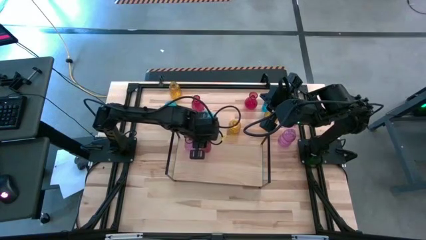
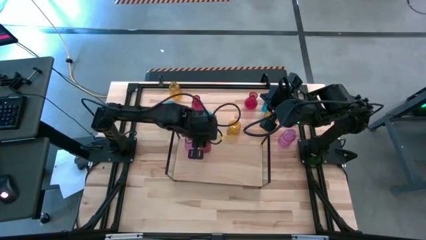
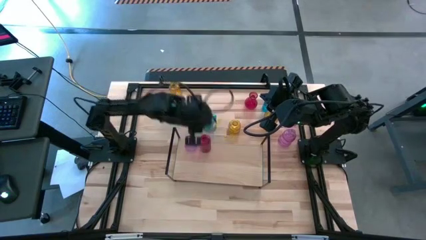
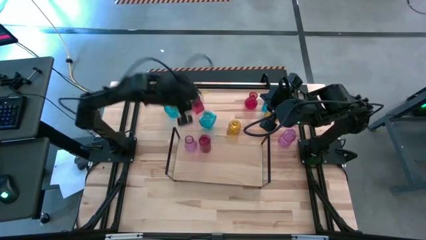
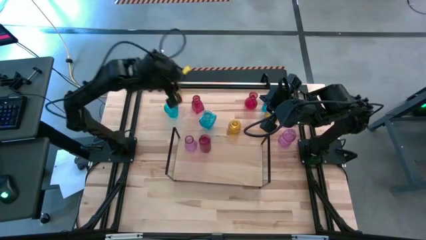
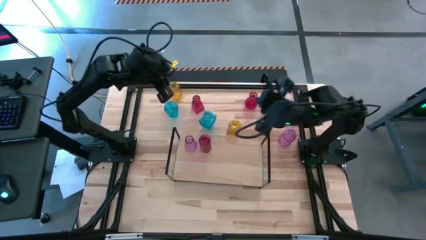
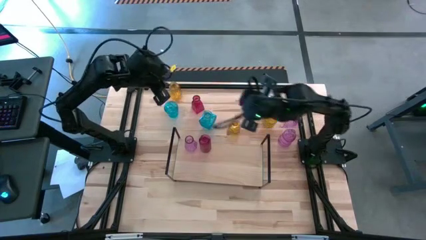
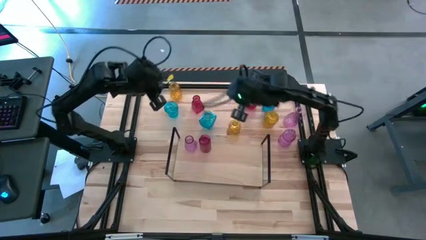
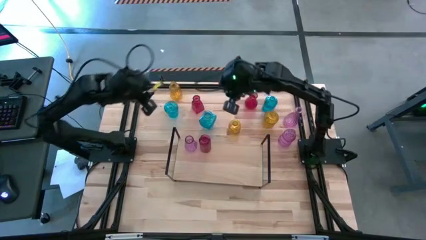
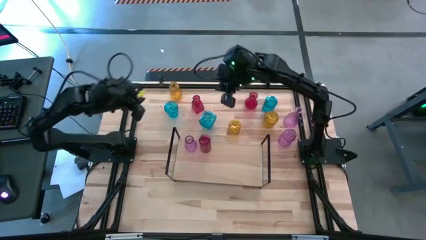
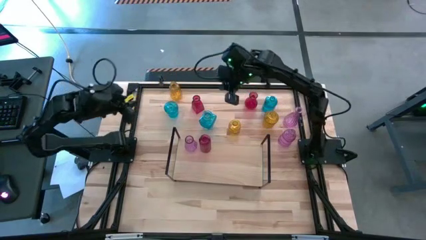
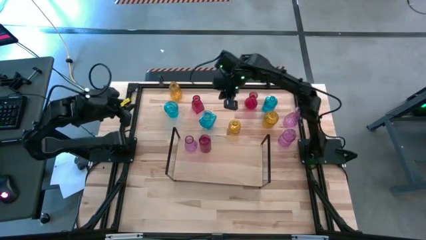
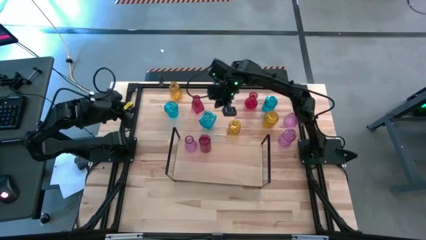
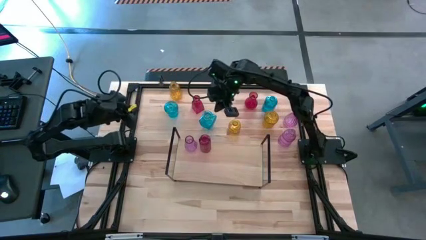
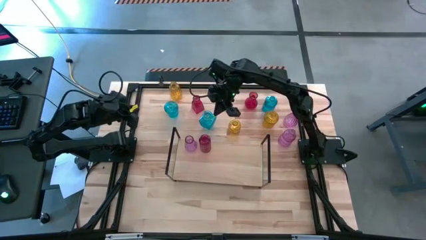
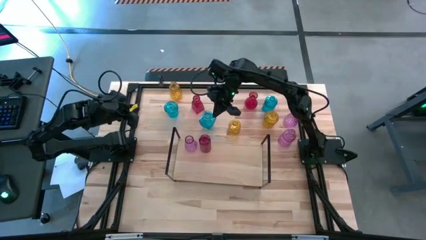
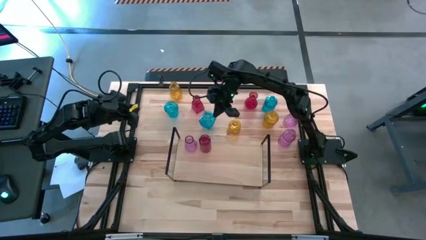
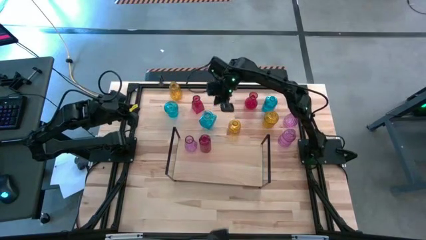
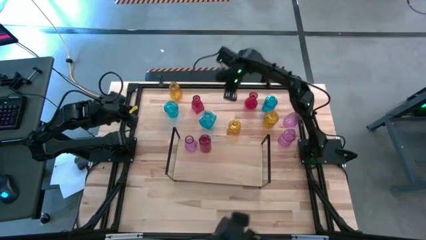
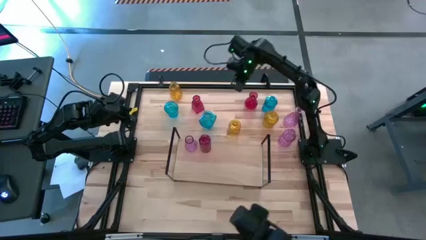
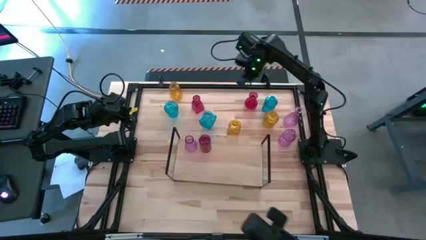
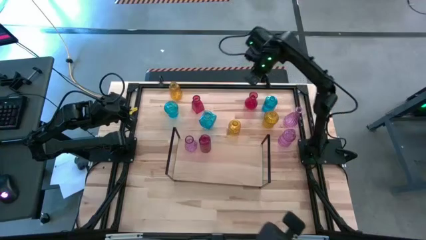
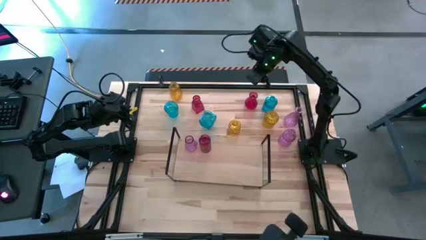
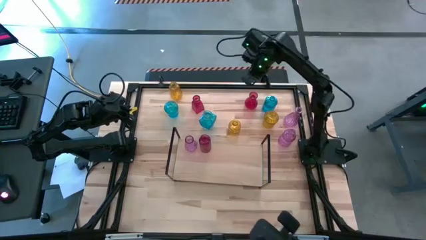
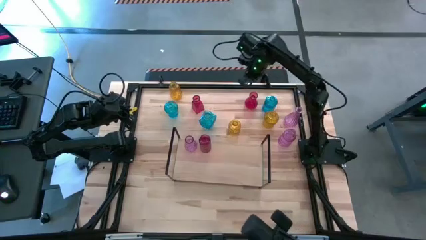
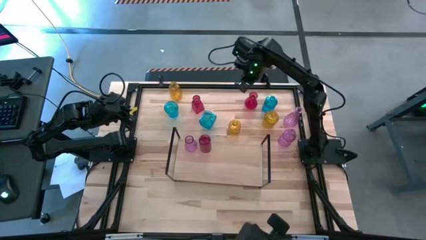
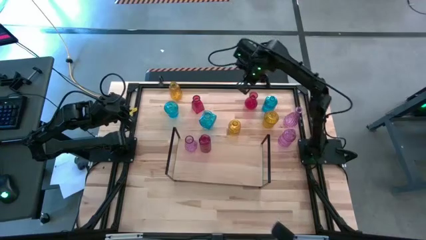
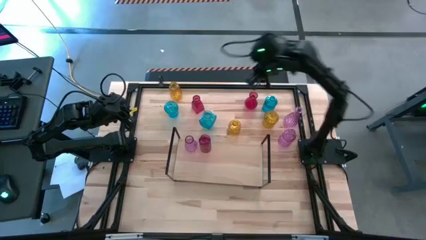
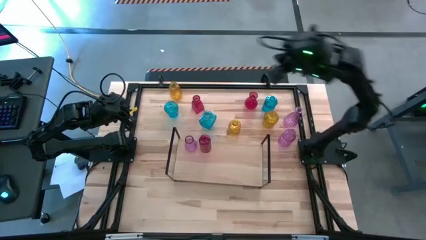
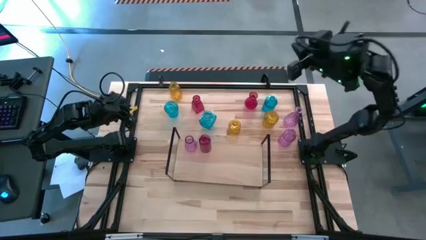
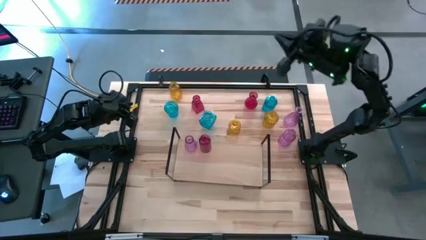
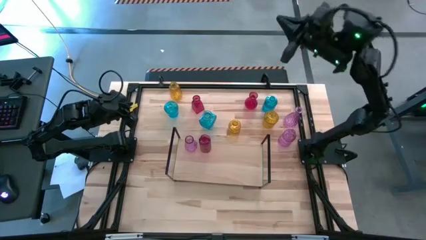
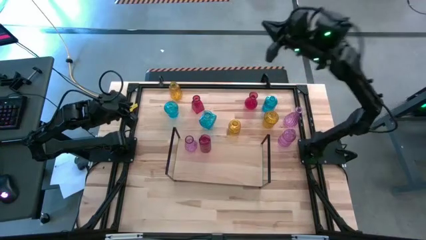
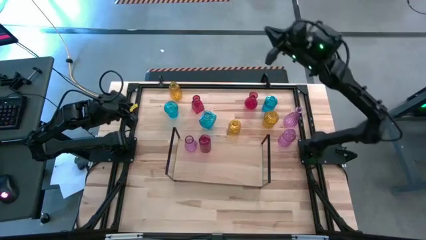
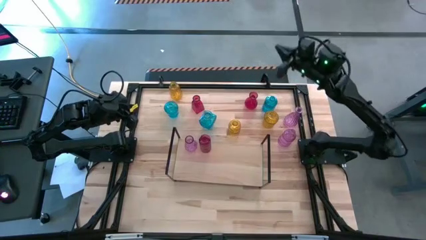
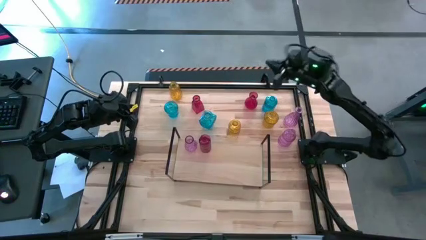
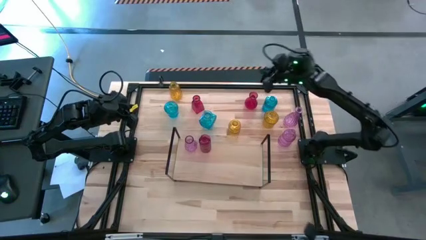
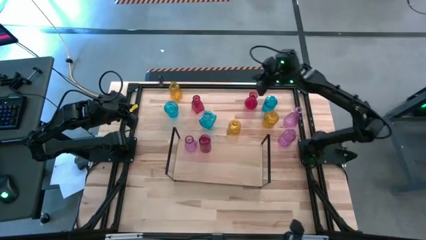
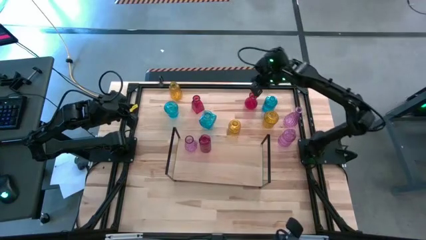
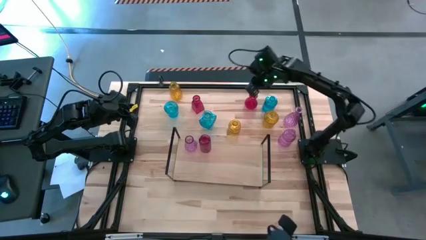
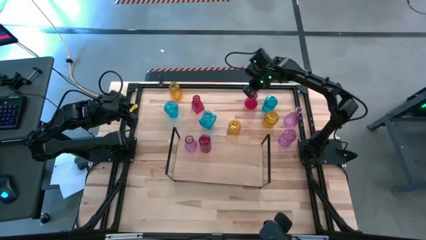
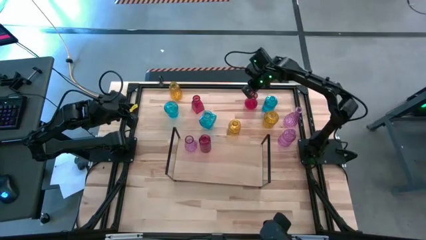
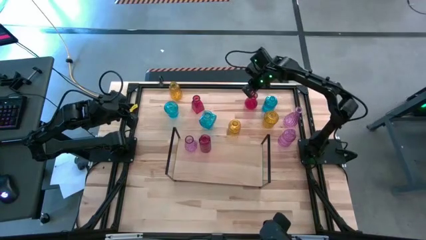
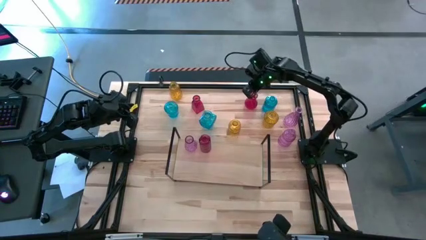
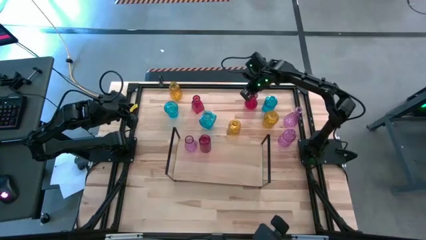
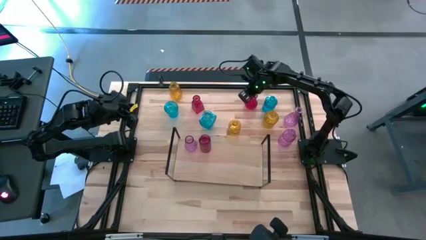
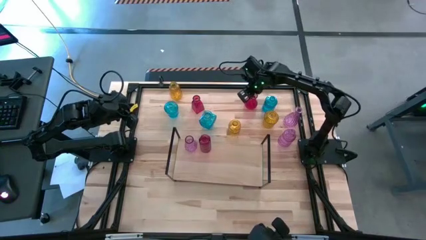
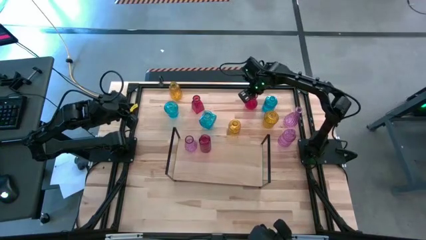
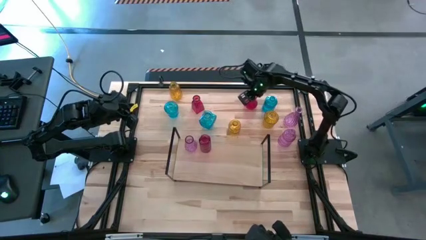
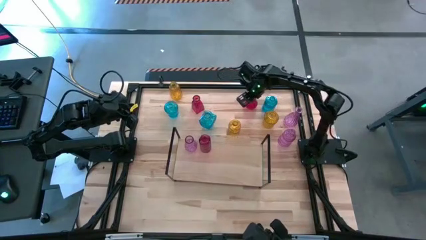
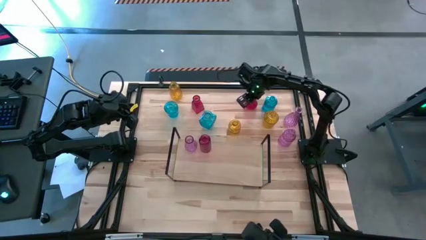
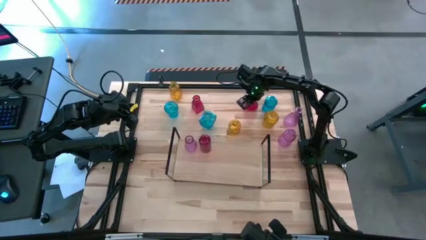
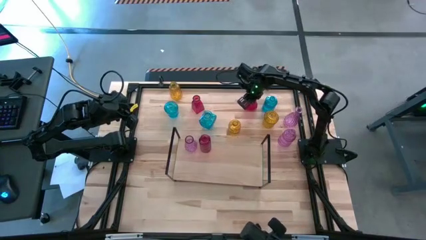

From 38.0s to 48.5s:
Task: sort vases onto shelf
Put the right red vase on the shelf aligned with the other red vase

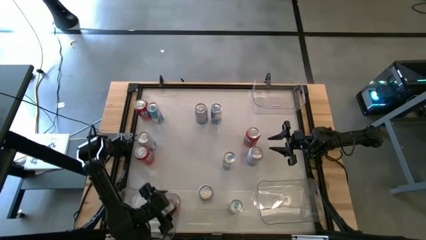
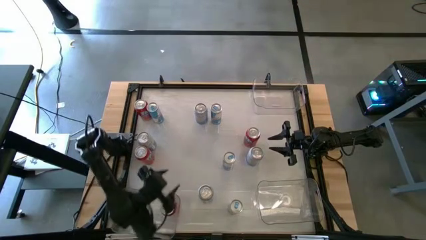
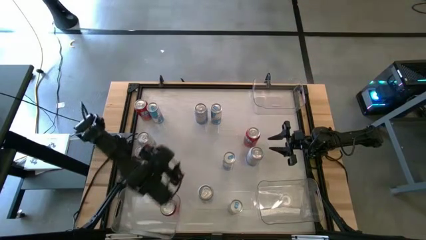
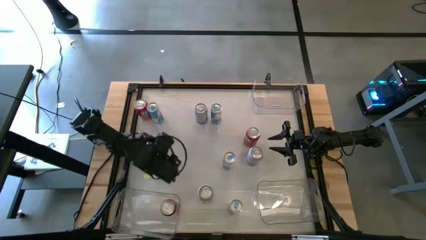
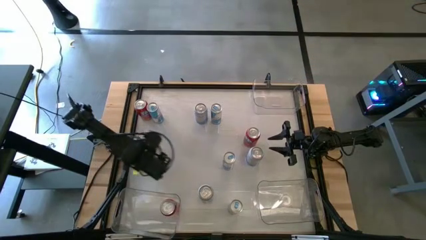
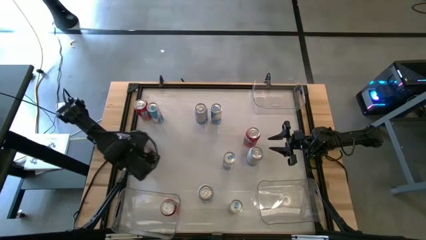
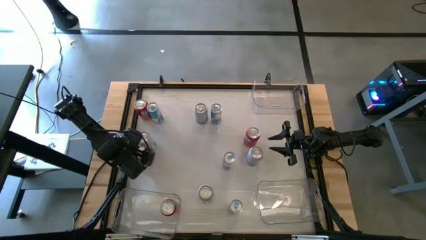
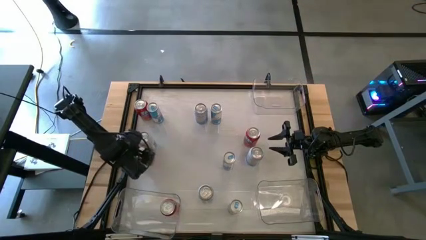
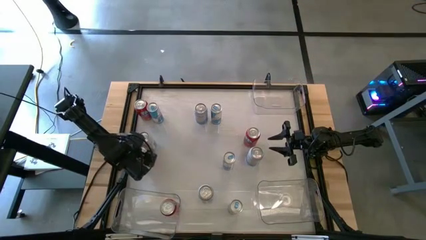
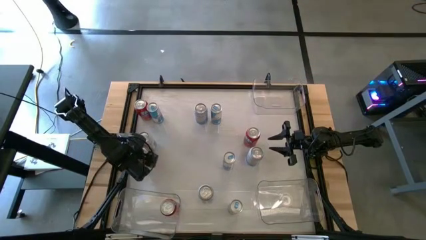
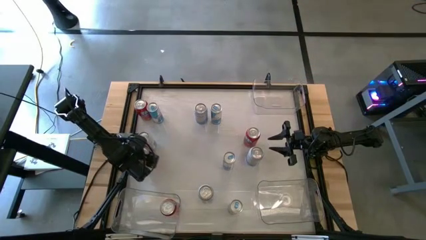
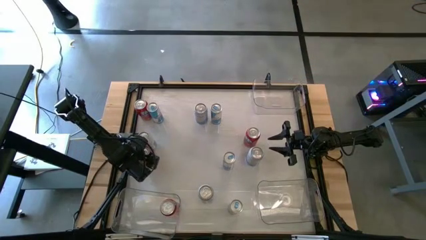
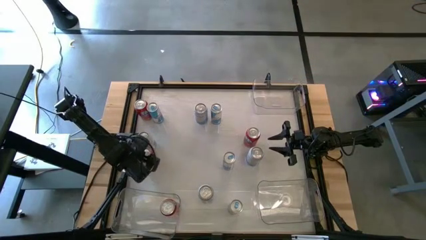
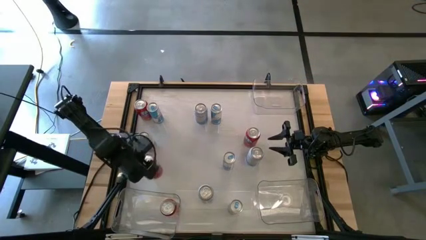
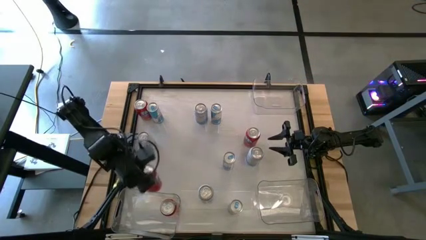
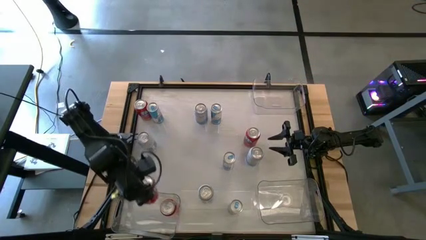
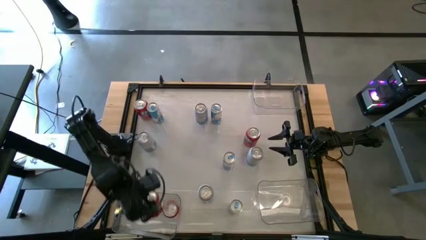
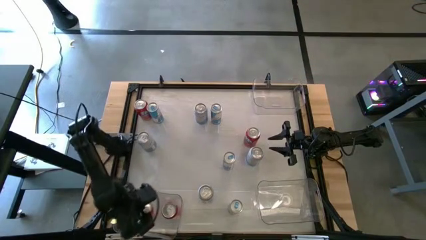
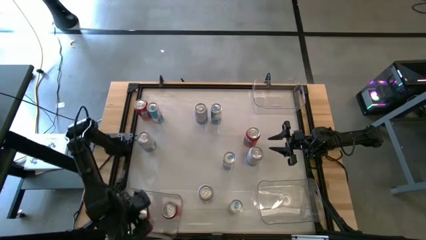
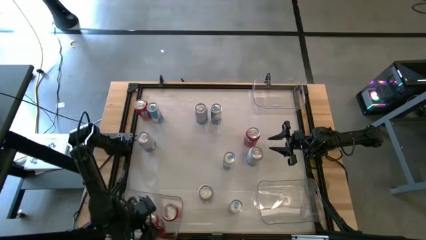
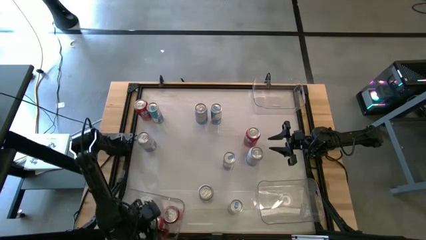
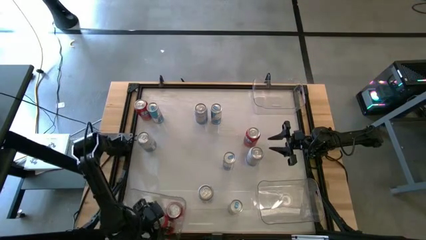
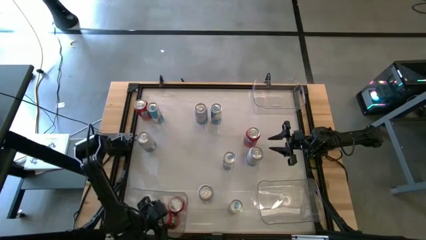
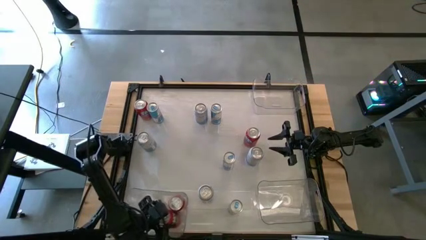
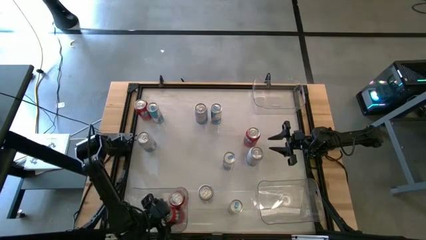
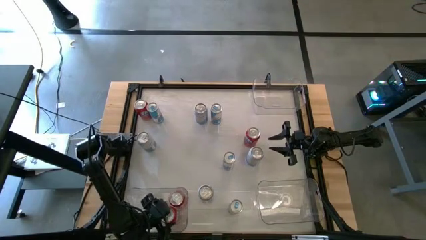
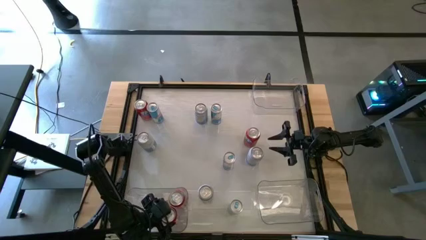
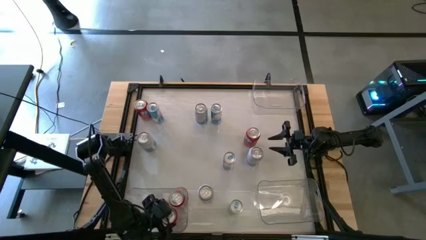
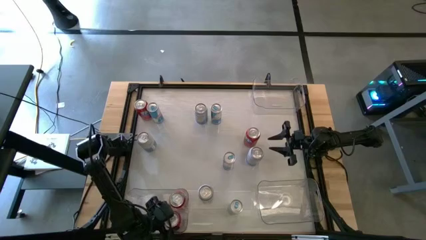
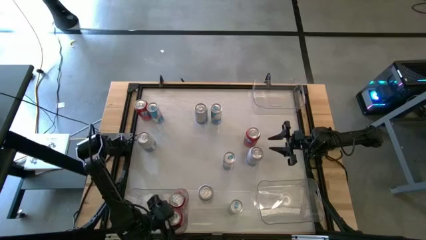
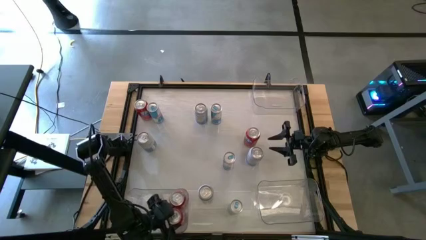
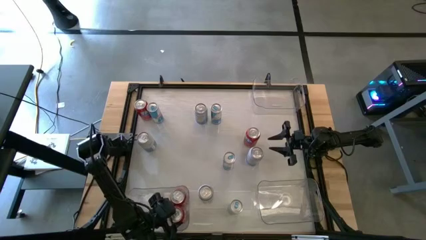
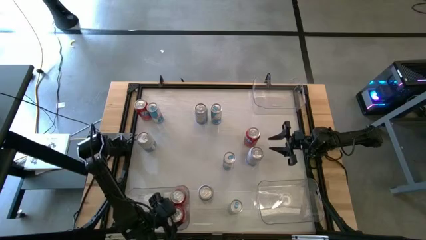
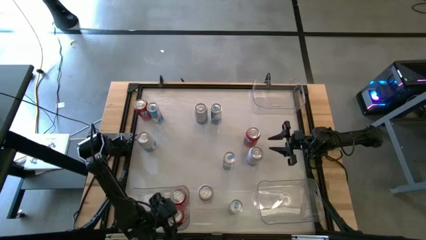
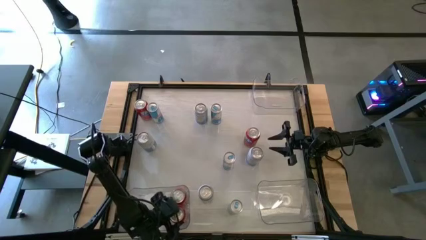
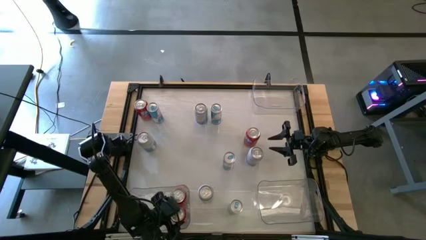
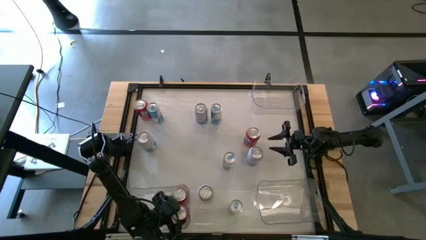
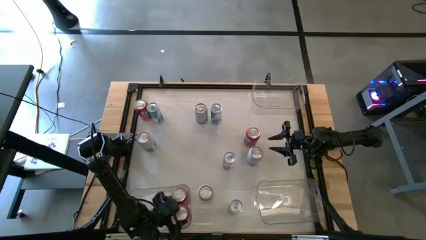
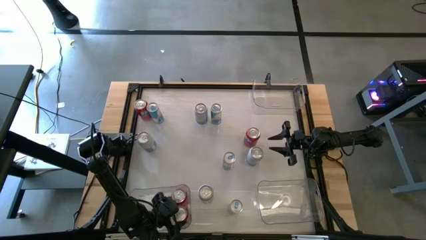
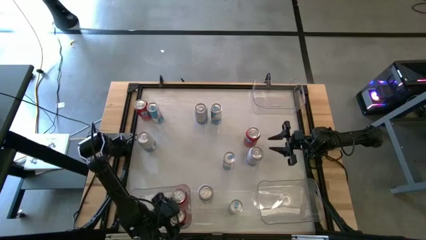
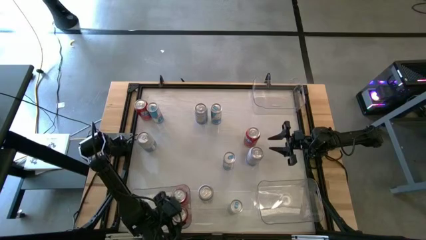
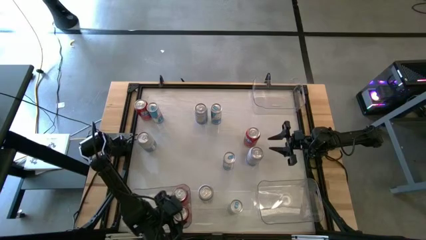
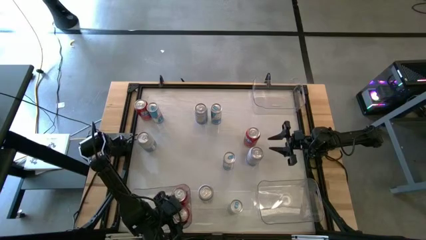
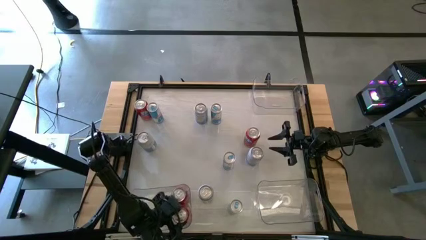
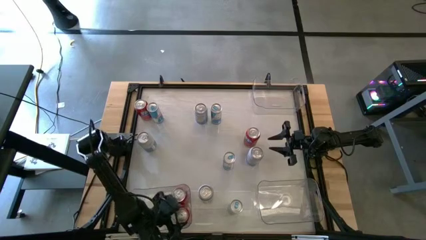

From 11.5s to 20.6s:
Task: Sort soda cans
Put the bottom left orange soda can into the bottom left transparent bin
